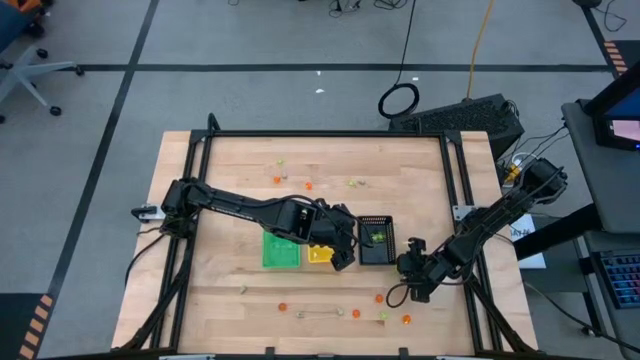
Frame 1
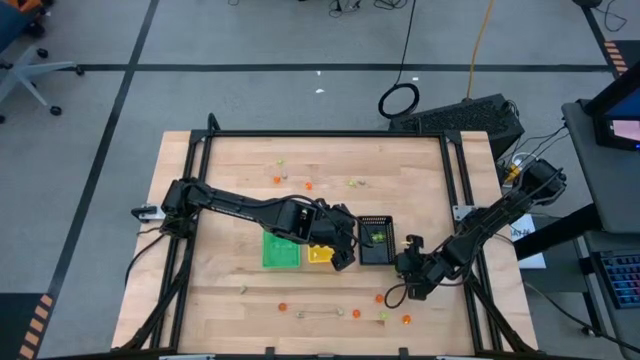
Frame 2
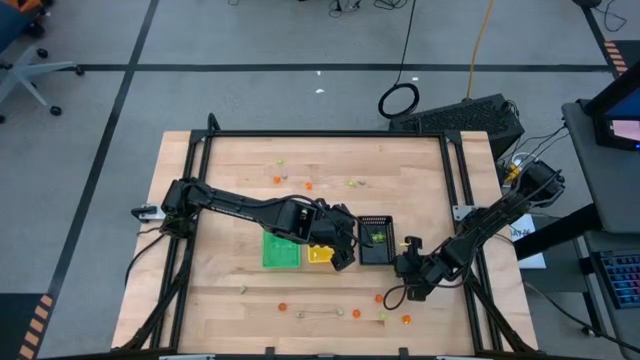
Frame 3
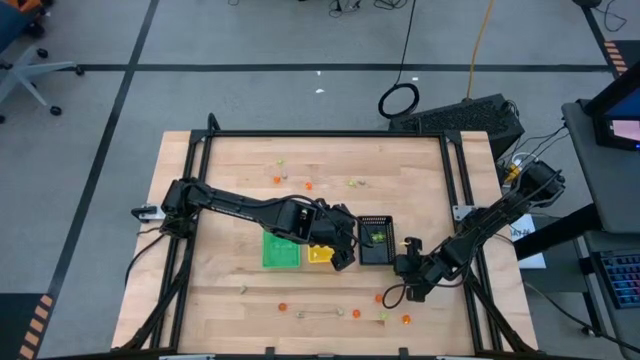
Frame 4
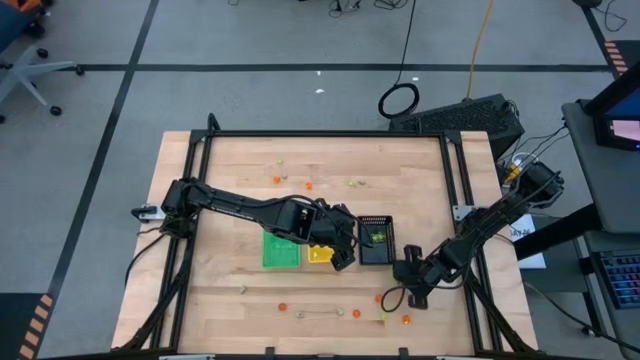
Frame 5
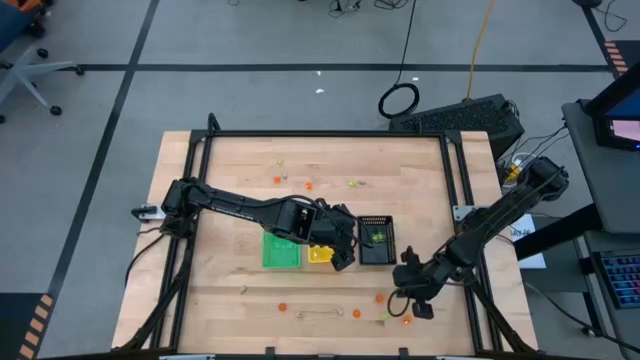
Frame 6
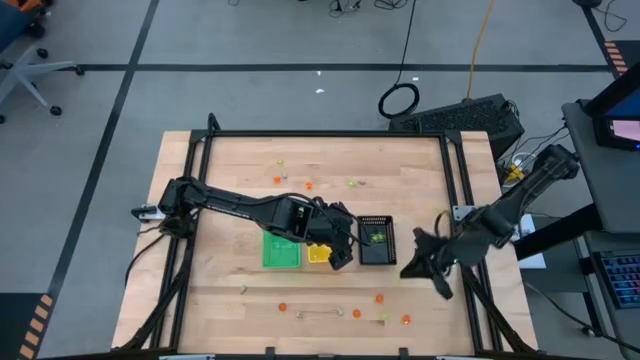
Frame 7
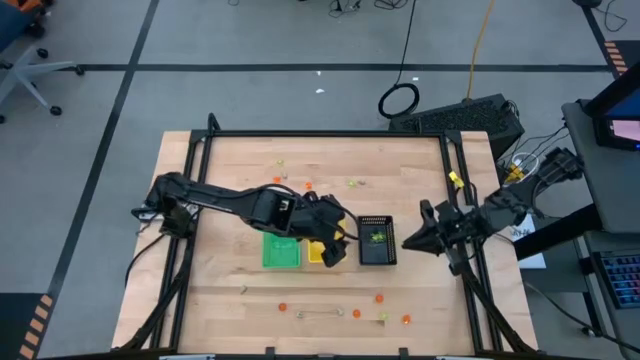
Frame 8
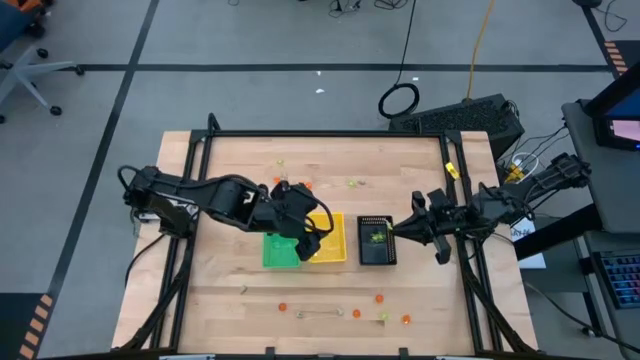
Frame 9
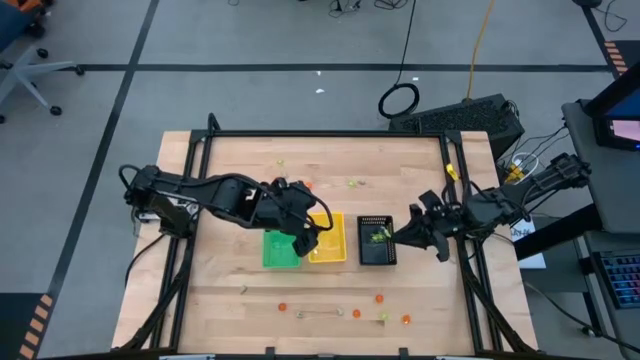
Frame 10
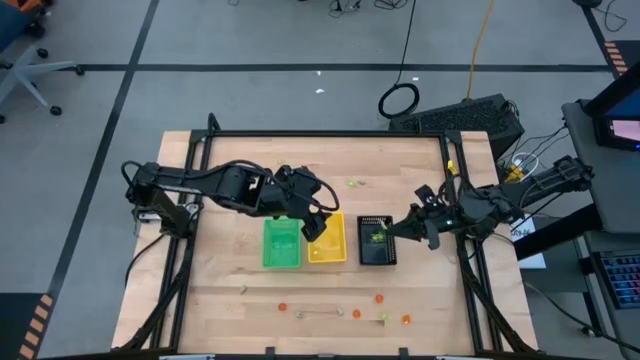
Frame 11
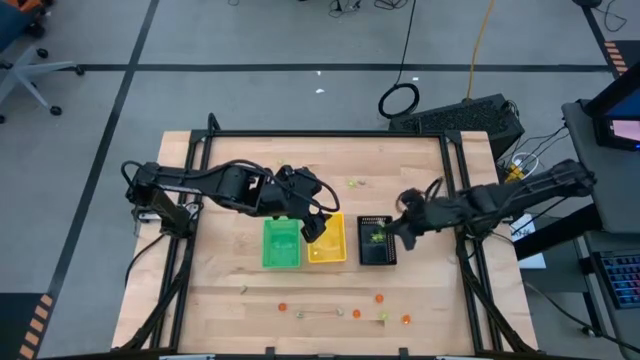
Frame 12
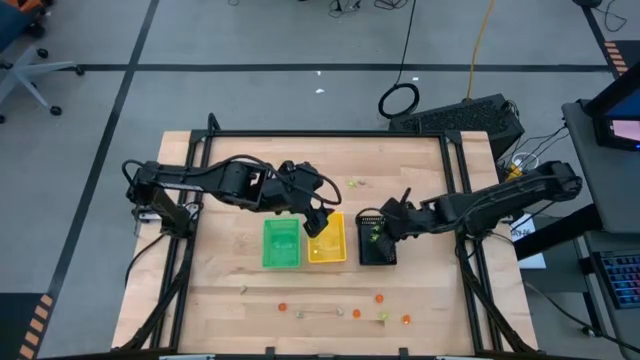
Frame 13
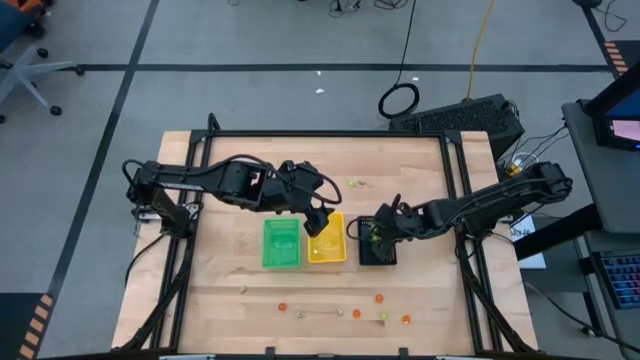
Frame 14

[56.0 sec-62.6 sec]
Task: Sort Halloween decoration
Put the green spider toy into the black basket

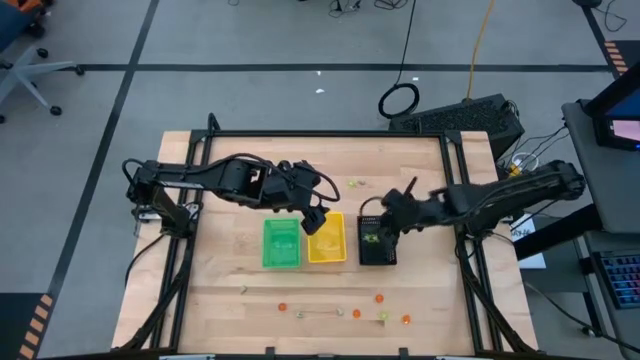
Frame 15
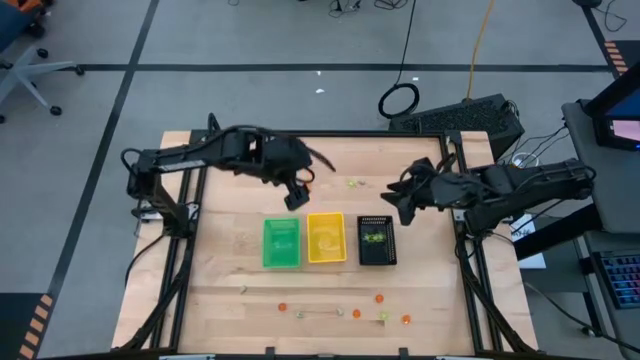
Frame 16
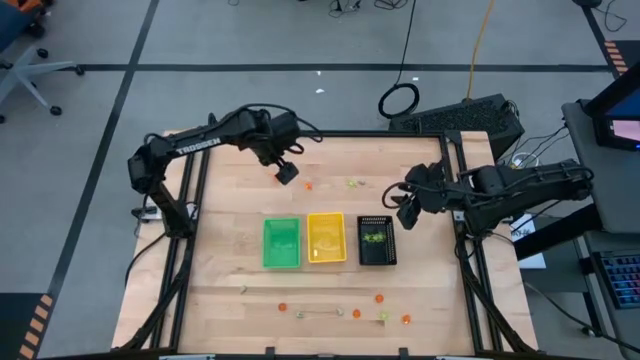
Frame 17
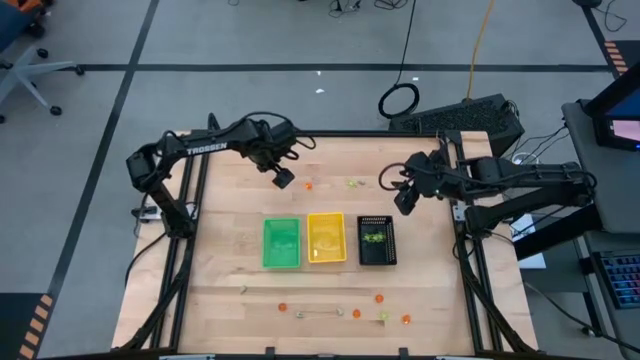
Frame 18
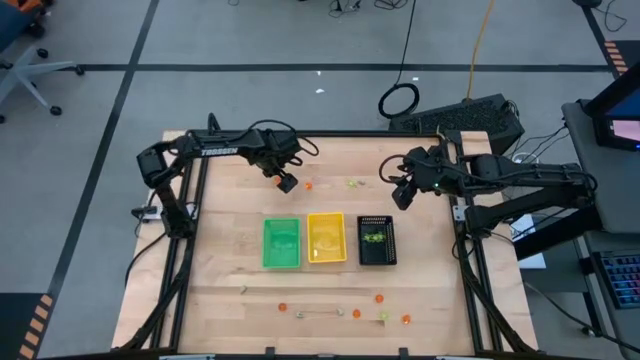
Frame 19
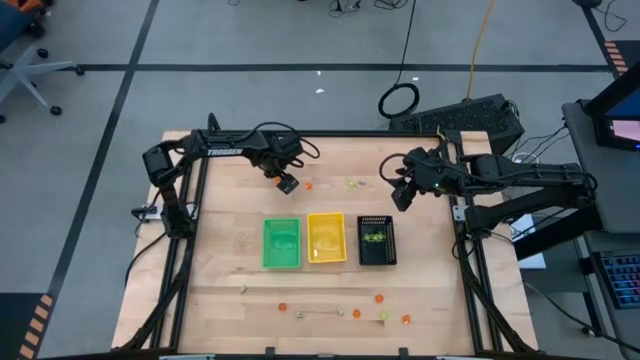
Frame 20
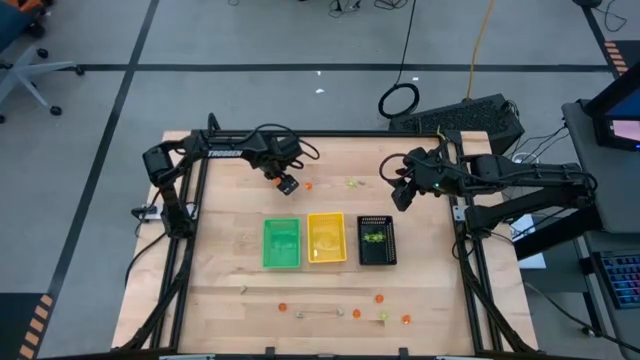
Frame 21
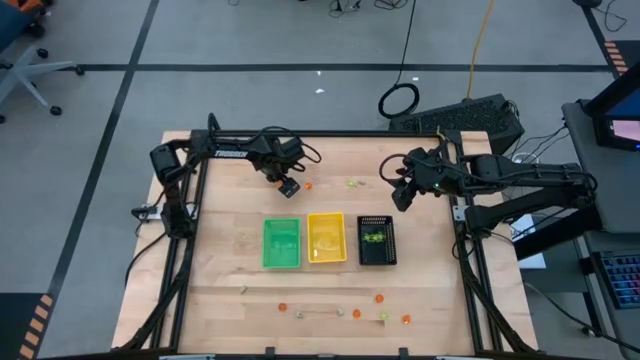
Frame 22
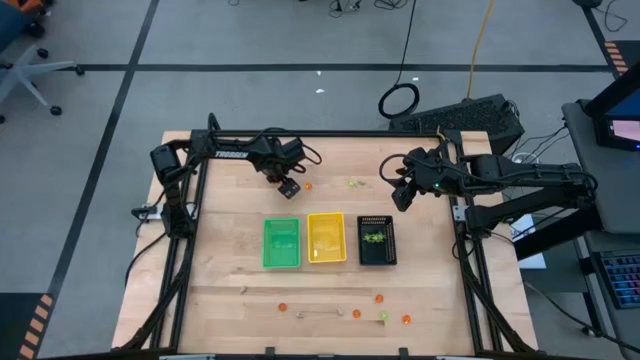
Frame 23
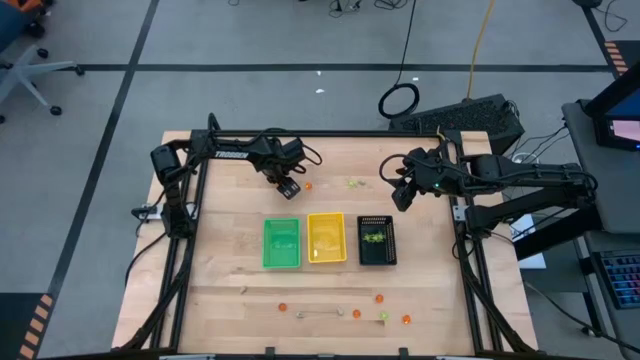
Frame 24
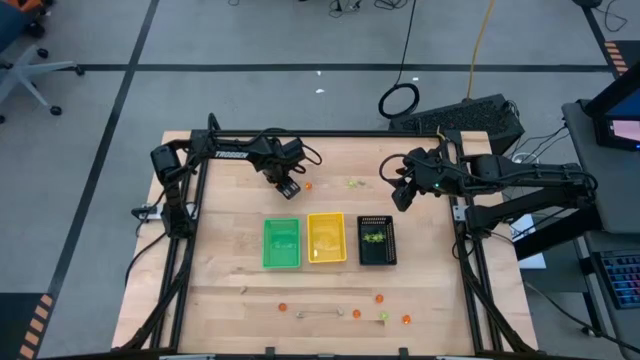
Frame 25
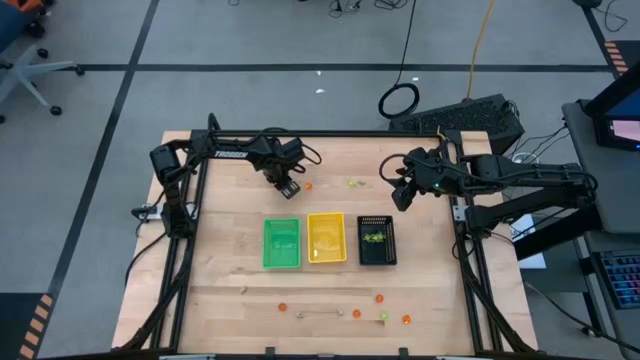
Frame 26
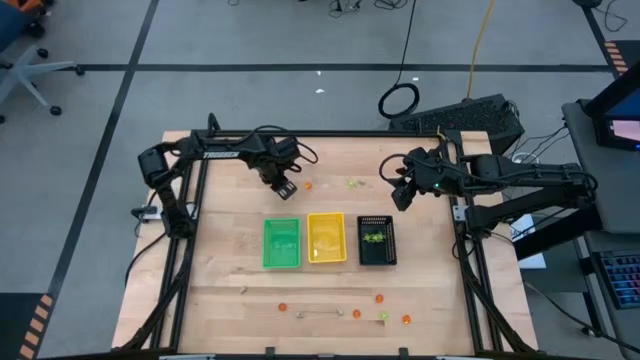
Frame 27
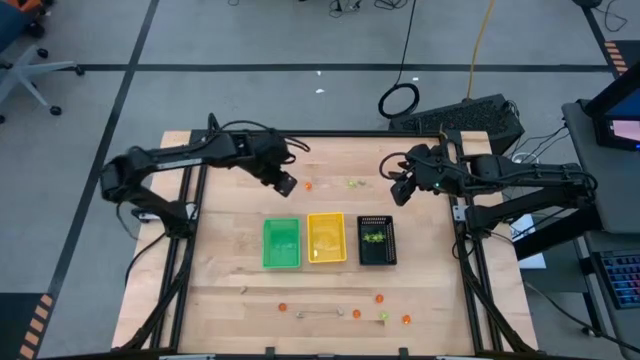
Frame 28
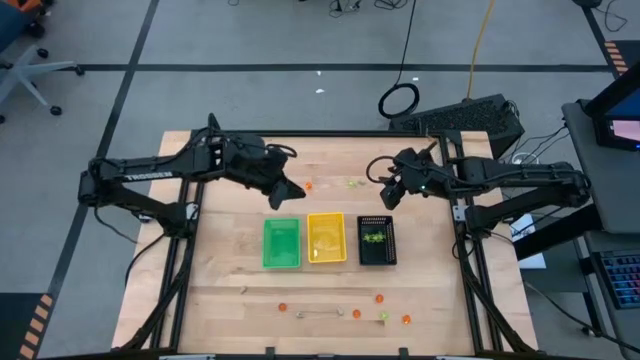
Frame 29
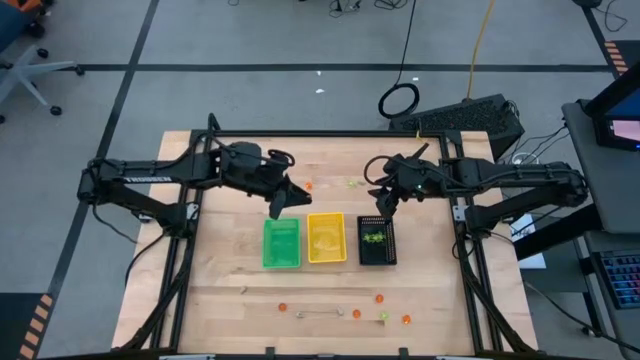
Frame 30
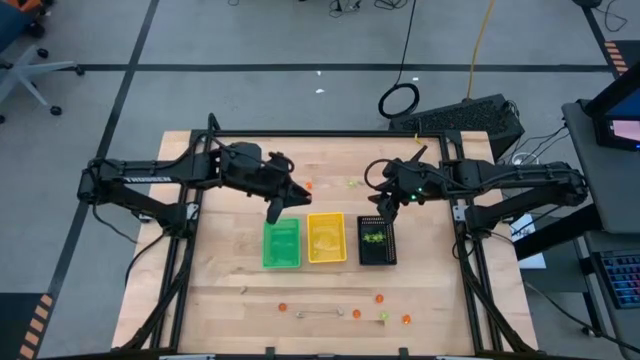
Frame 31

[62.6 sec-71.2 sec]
Put the orange pumpkin toy into the yellow basket
